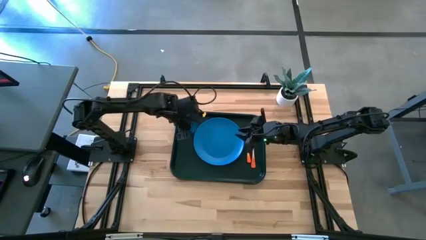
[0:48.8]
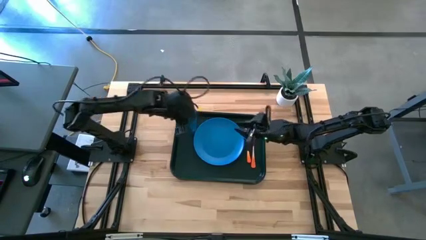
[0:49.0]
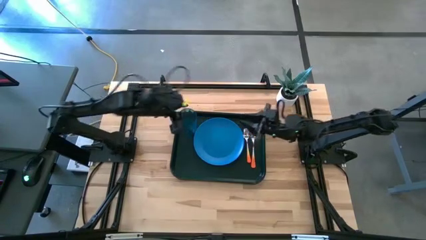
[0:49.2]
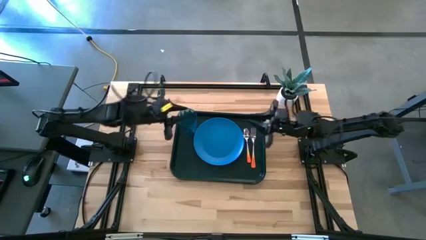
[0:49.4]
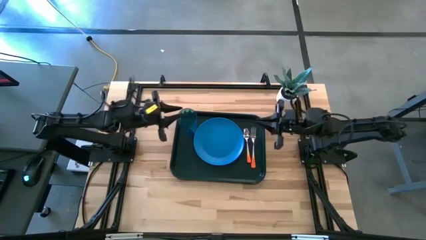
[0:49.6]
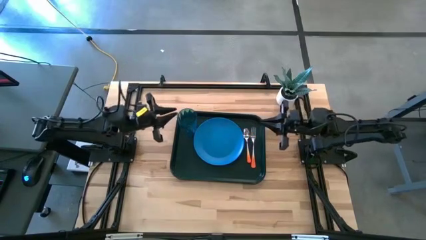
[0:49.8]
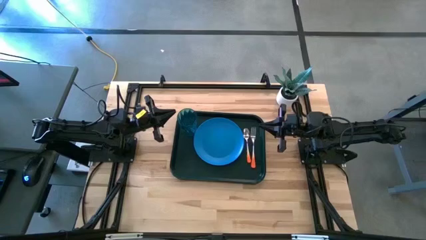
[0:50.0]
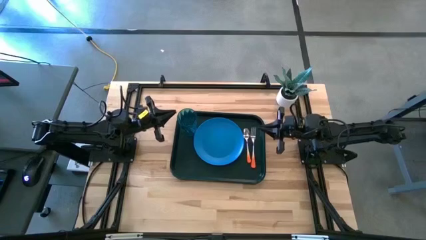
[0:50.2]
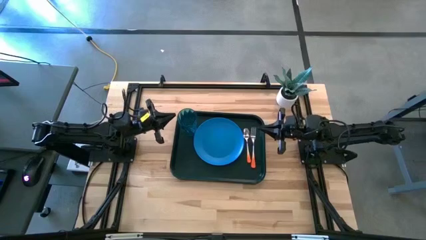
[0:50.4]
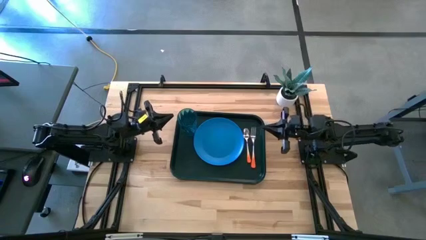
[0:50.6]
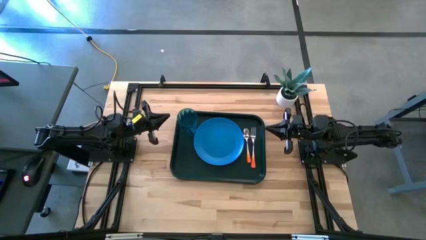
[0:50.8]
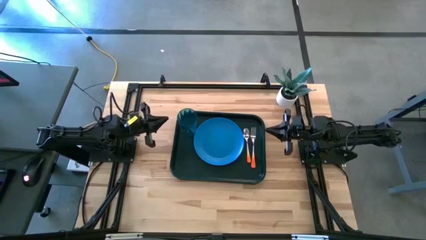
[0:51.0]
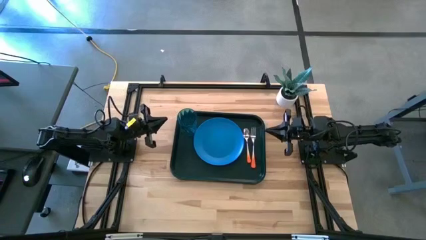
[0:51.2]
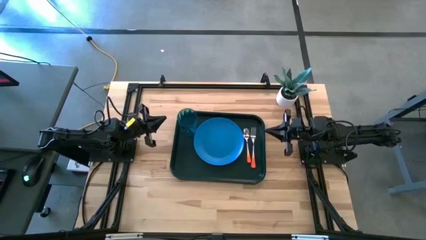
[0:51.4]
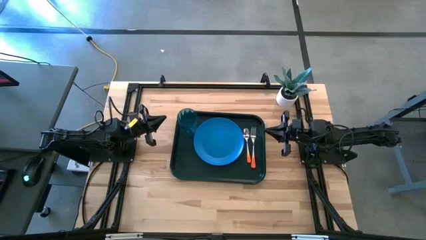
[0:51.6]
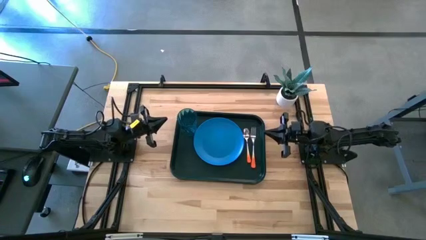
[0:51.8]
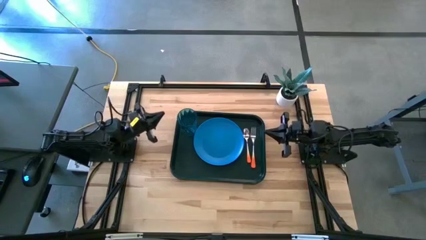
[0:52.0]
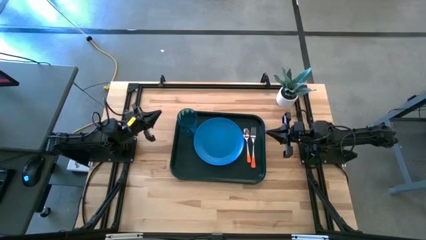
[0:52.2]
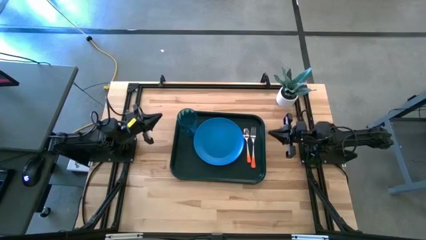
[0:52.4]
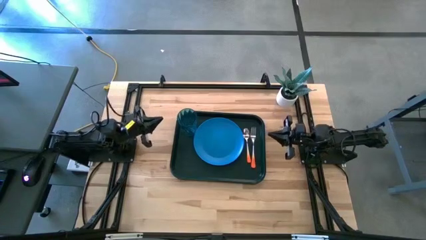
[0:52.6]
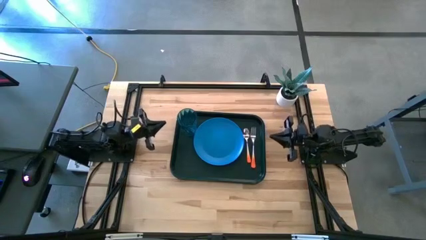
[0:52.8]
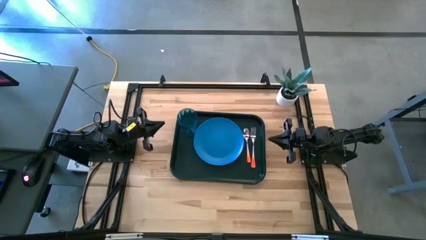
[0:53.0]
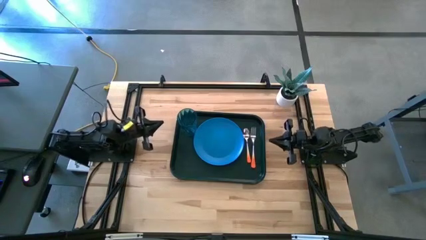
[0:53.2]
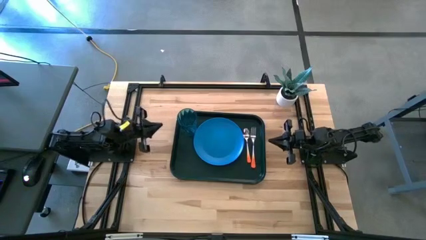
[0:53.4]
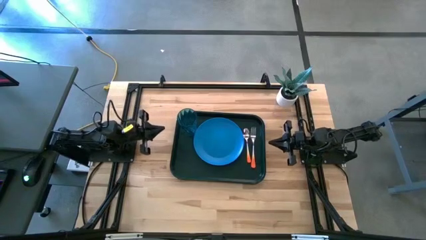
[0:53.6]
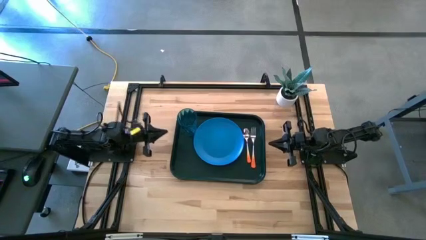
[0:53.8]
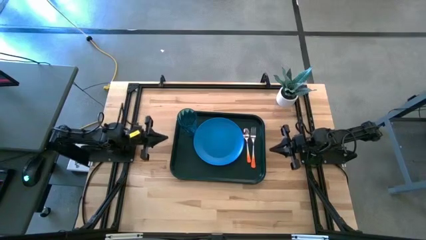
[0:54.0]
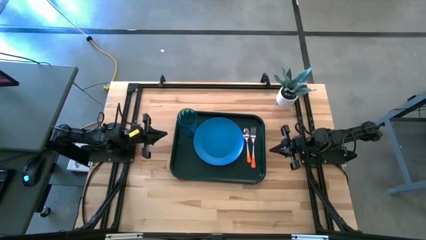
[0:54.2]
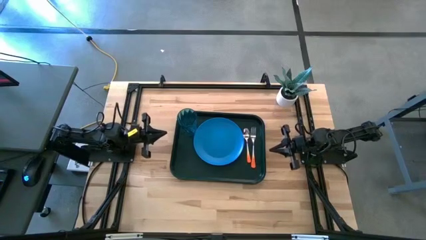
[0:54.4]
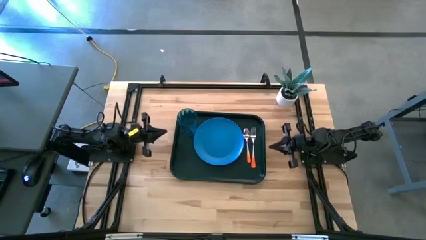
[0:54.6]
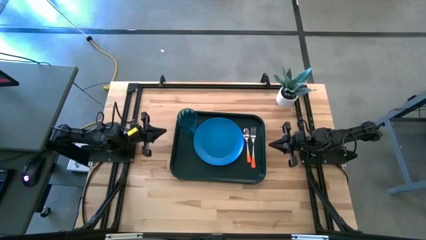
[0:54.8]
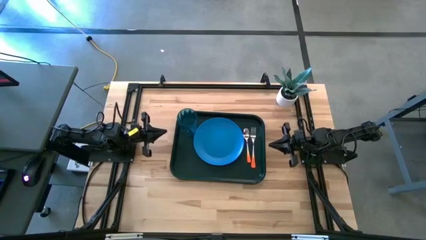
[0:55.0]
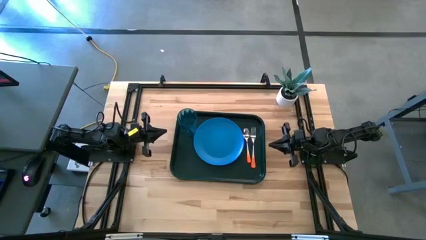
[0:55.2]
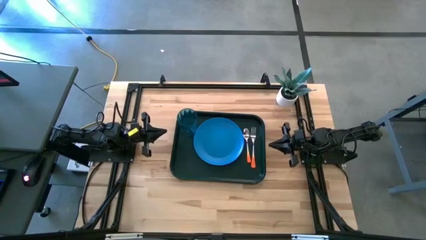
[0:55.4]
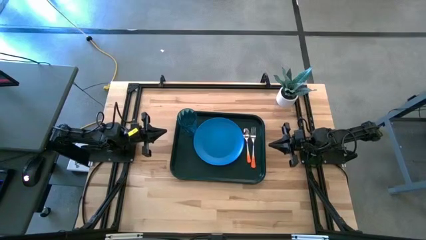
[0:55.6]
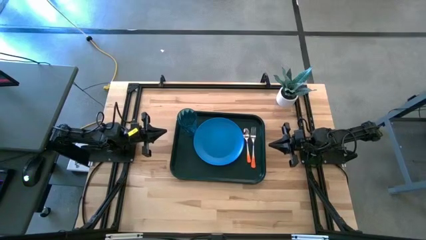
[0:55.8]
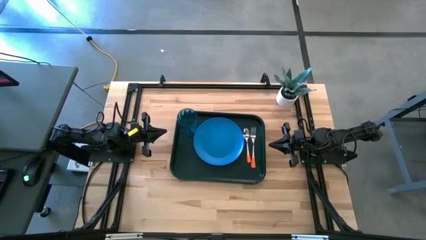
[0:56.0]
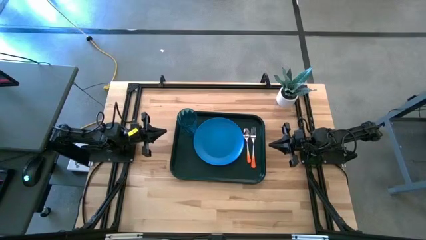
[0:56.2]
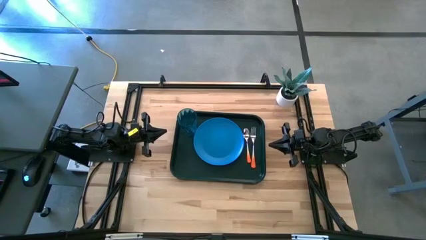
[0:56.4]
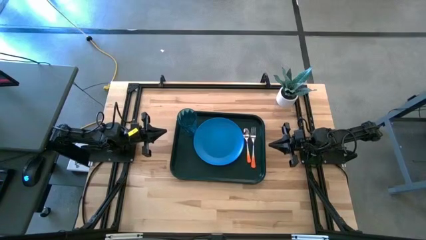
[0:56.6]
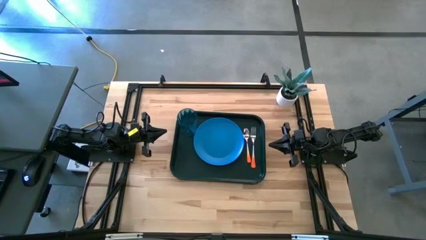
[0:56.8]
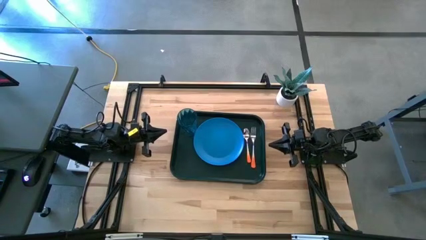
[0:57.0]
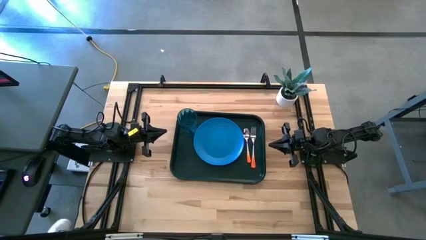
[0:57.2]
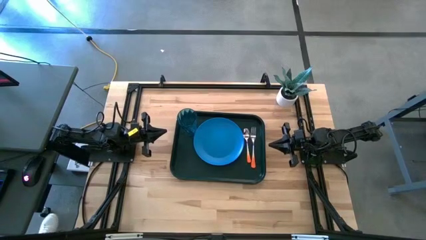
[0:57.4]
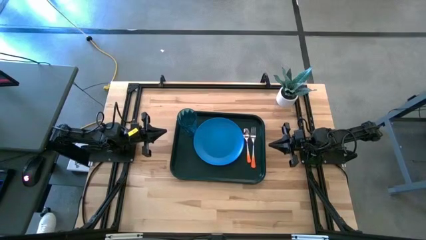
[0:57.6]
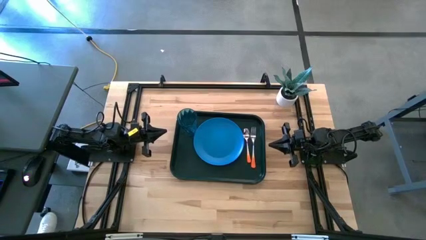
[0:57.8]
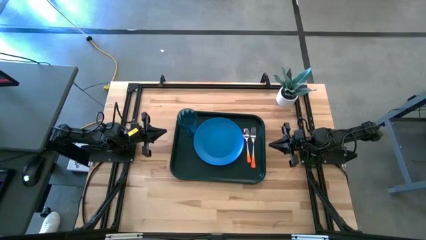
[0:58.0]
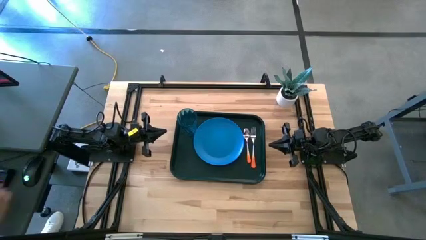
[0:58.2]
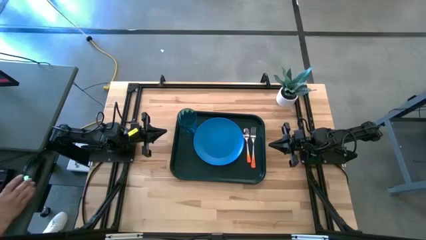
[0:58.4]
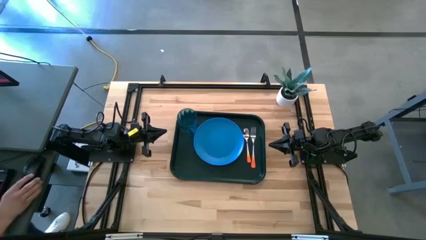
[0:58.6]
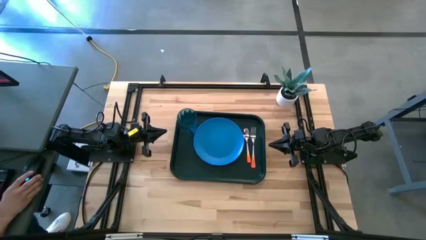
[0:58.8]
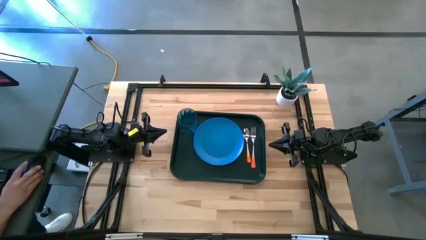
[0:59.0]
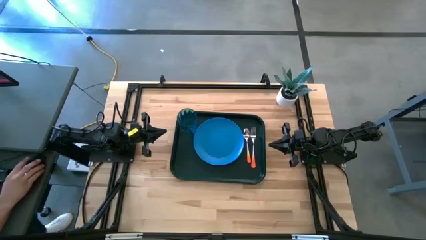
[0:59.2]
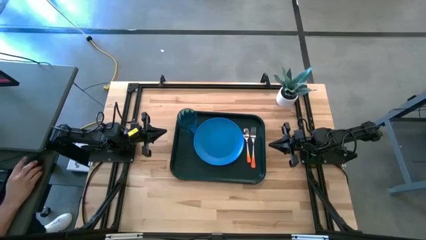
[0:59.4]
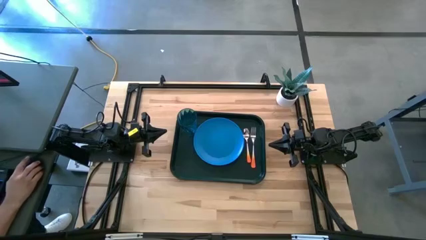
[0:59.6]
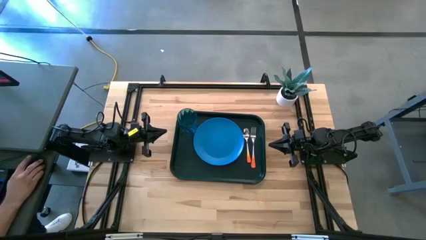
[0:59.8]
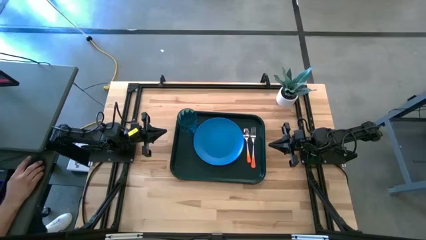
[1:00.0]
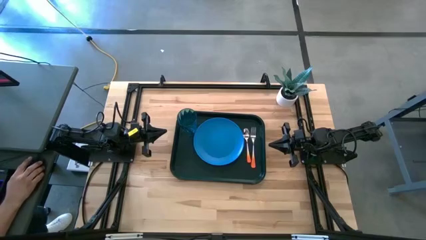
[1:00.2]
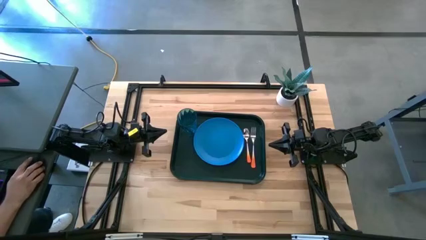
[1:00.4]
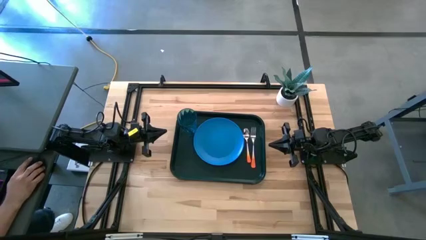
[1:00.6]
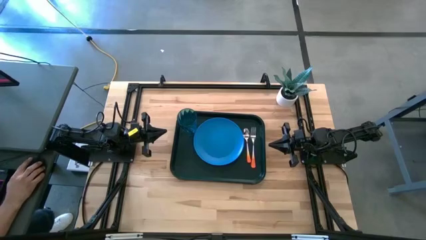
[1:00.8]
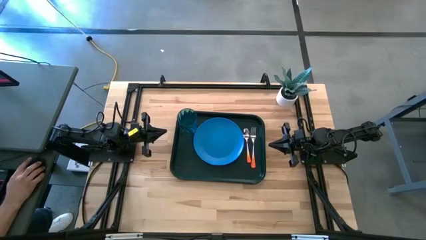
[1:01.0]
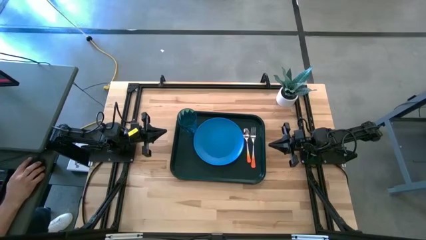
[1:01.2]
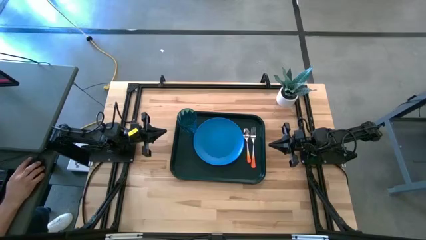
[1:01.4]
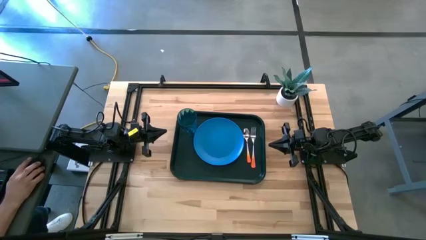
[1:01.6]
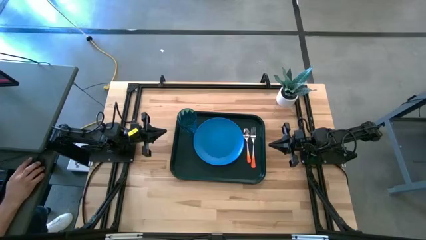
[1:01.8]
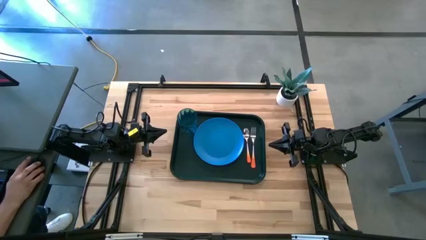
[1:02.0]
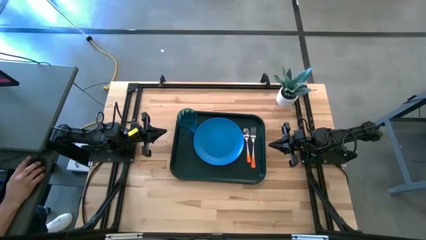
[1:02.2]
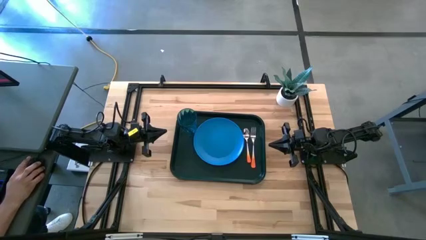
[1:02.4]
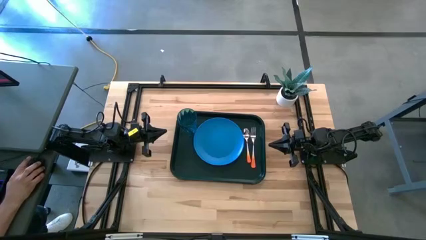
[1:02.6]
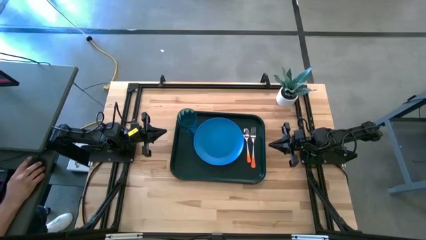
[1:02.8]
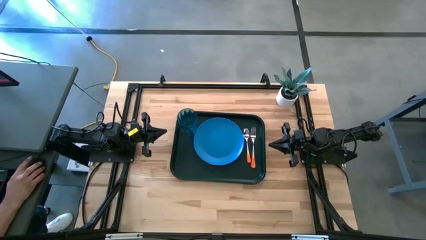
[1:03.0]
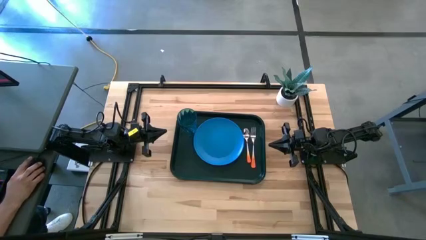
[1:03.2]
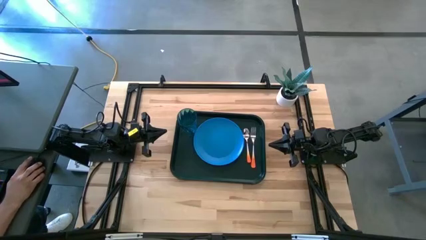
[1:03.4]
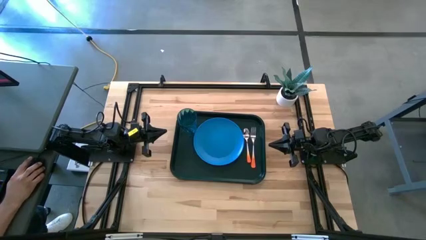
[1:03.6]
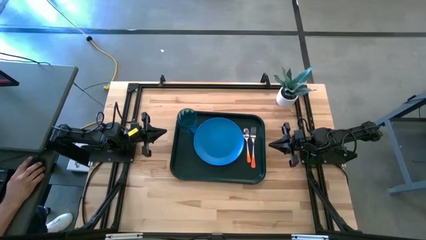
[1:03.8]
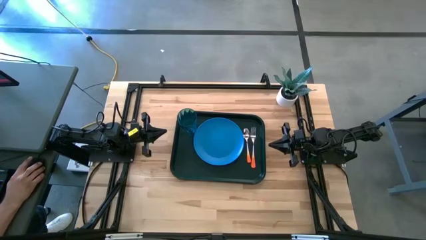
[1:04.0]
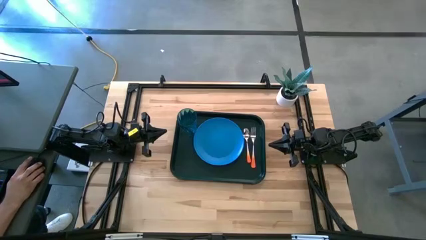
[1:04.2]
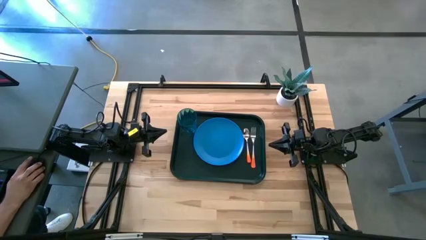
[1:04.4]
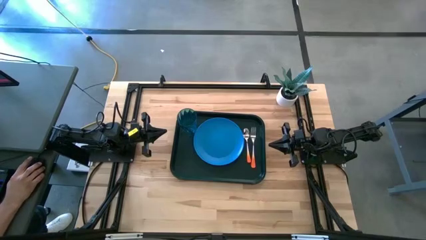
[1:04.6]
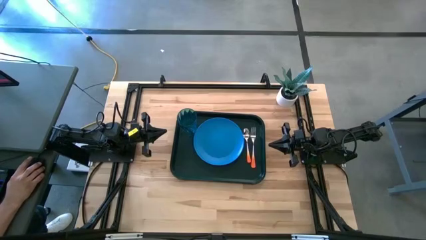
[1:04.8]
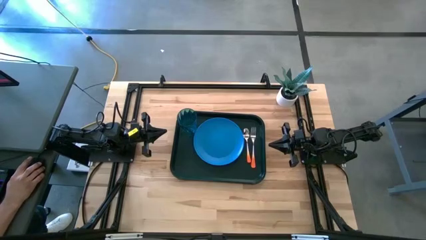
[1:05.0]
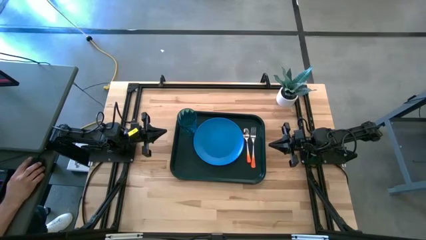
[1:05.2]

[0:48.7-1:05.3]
Task: Pick and place plate/cup/fork/spoon on tray
Return to Home Position
